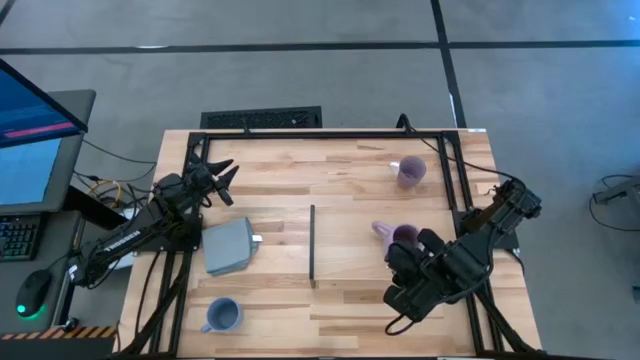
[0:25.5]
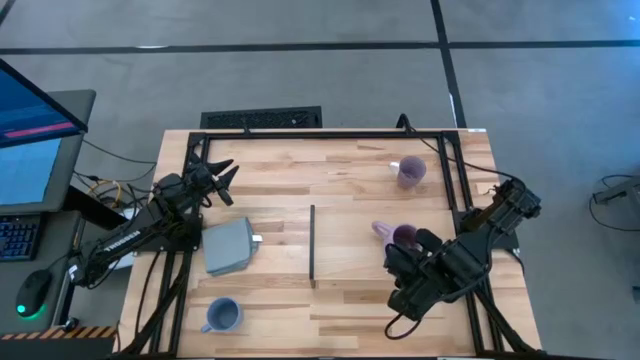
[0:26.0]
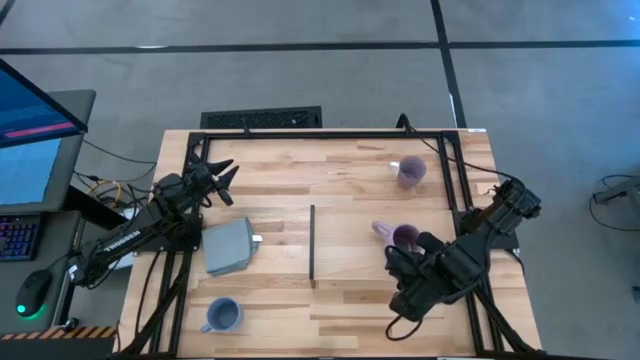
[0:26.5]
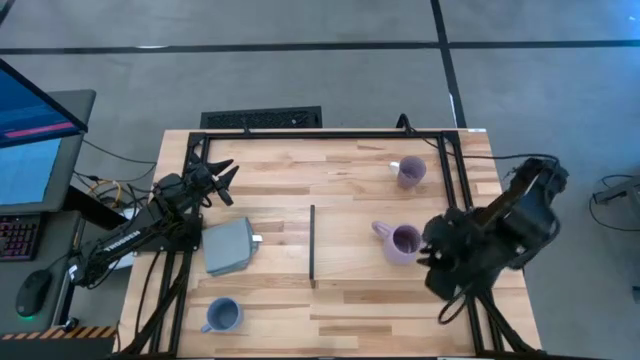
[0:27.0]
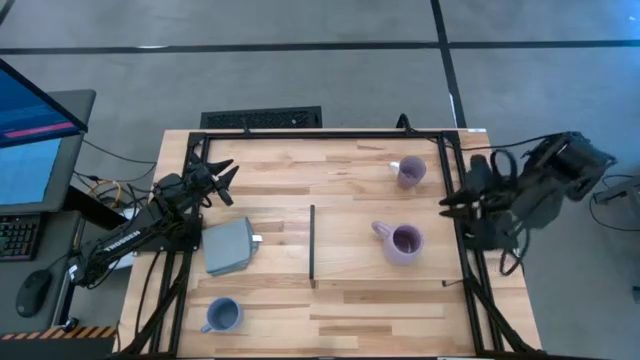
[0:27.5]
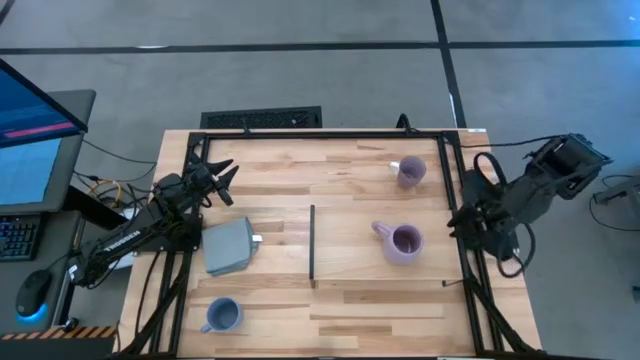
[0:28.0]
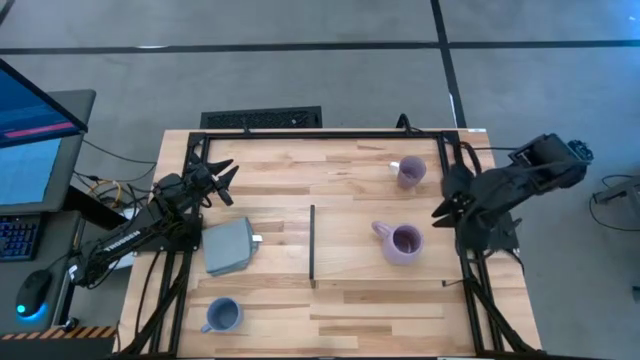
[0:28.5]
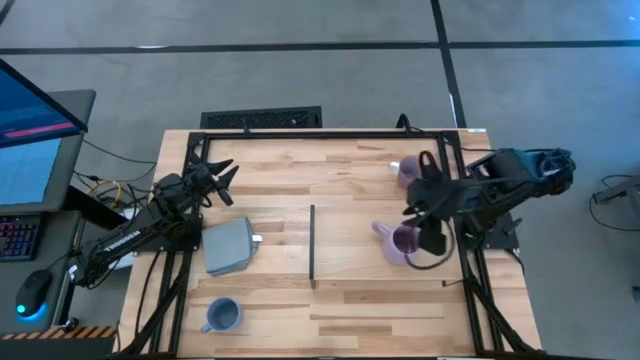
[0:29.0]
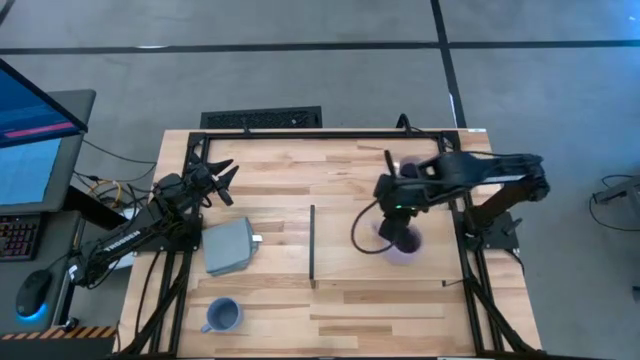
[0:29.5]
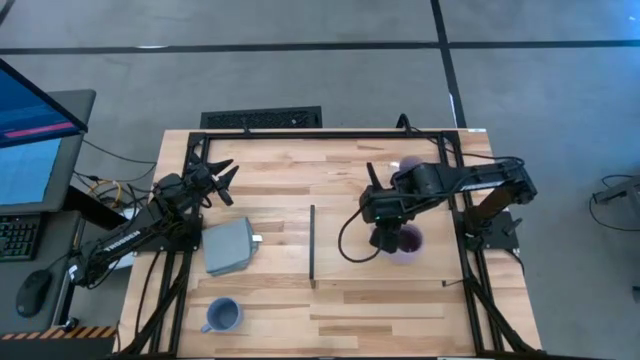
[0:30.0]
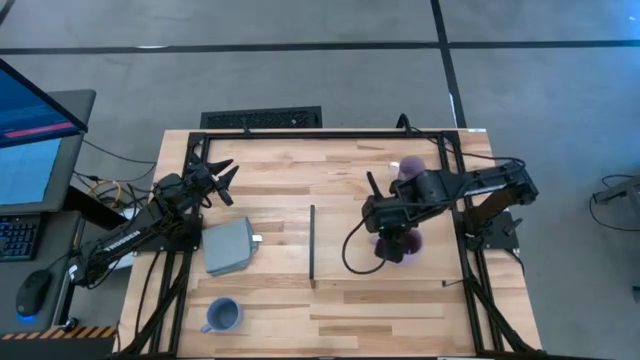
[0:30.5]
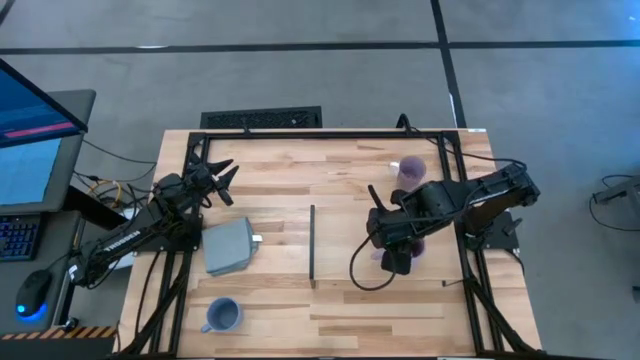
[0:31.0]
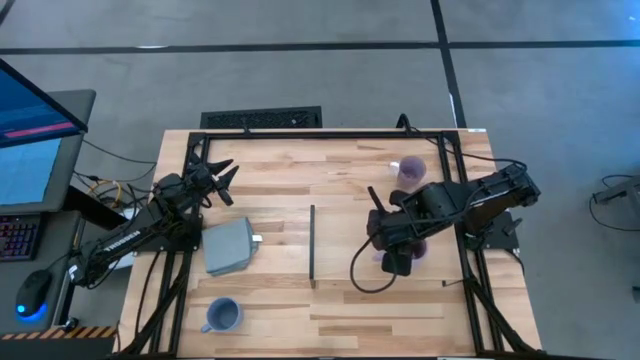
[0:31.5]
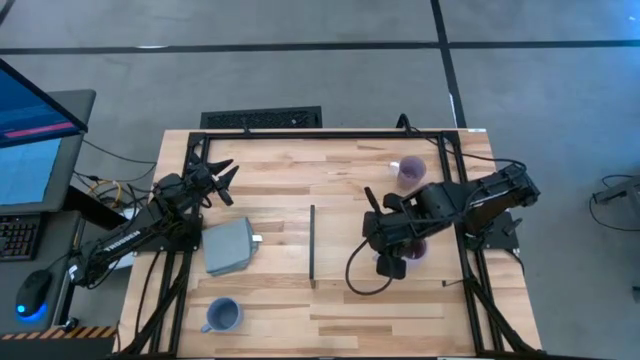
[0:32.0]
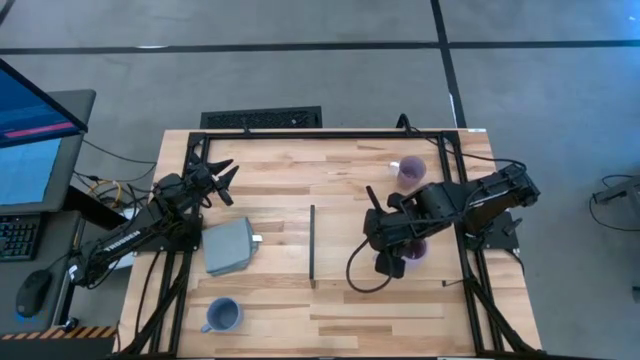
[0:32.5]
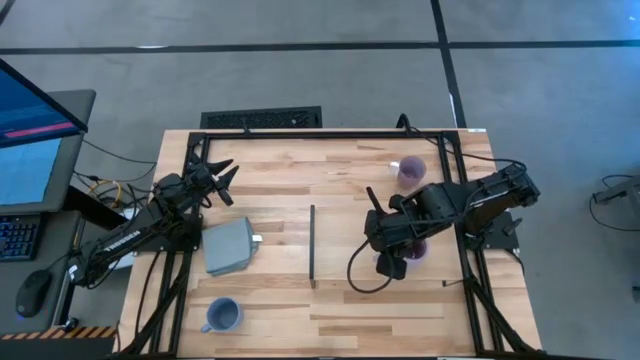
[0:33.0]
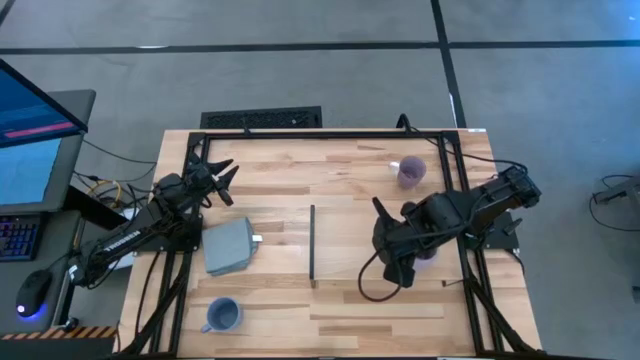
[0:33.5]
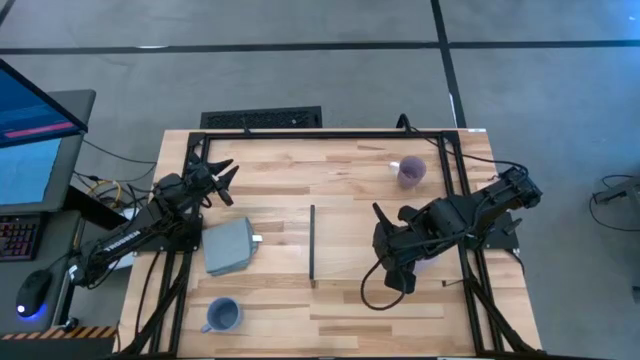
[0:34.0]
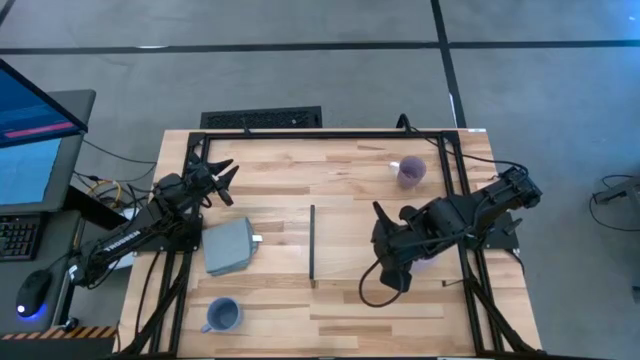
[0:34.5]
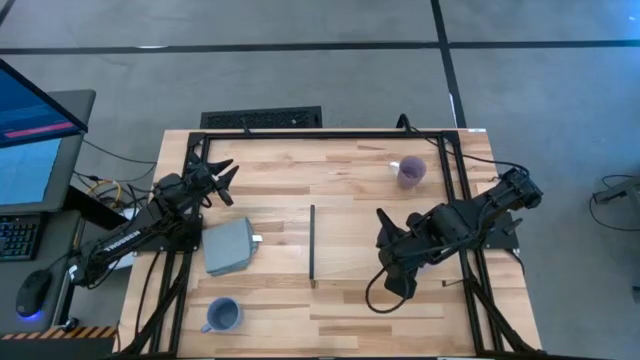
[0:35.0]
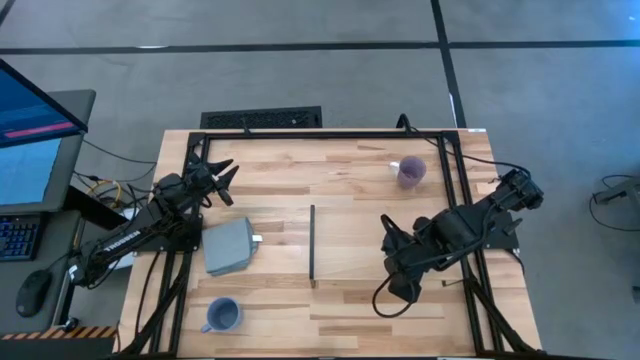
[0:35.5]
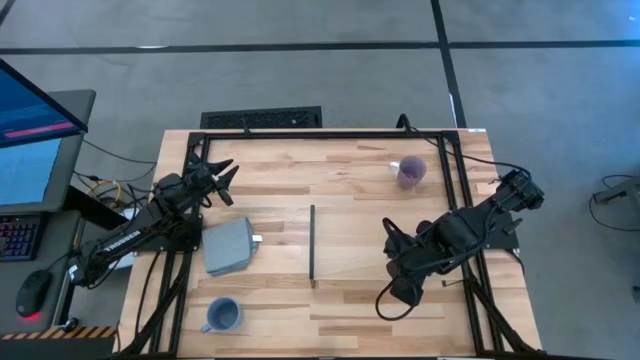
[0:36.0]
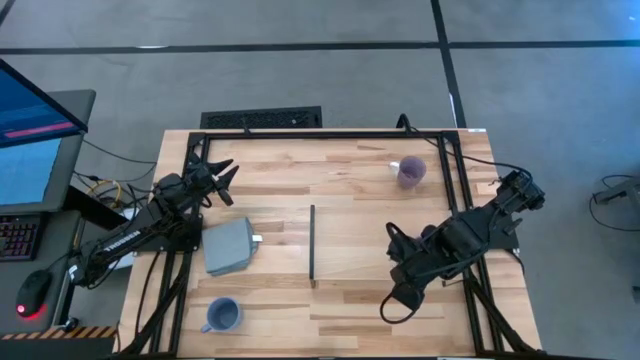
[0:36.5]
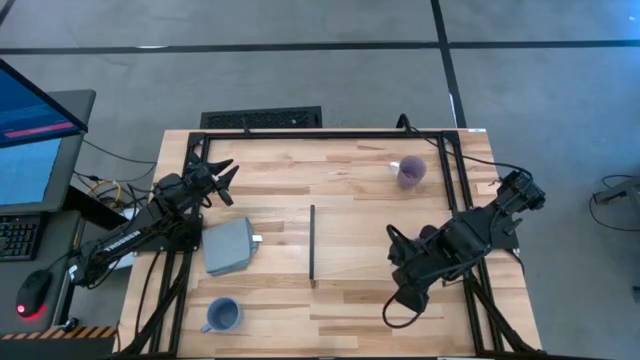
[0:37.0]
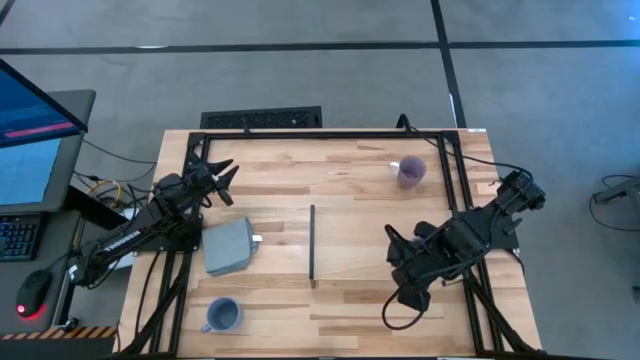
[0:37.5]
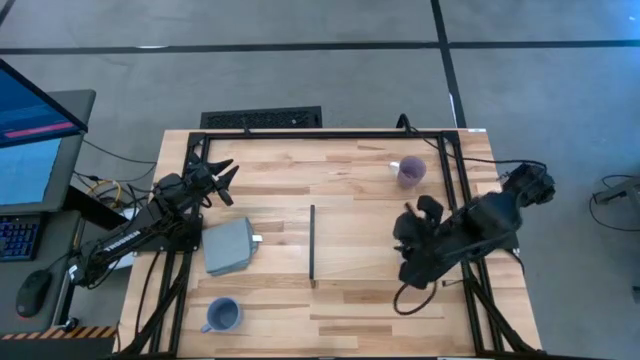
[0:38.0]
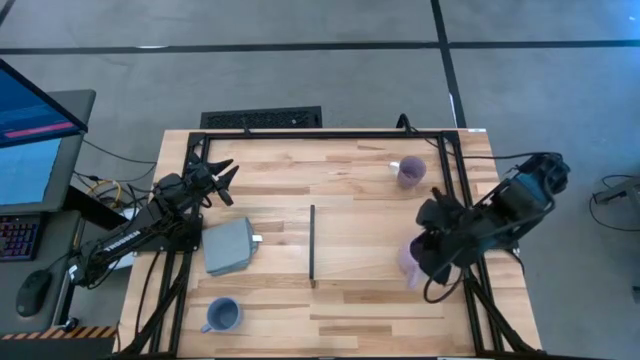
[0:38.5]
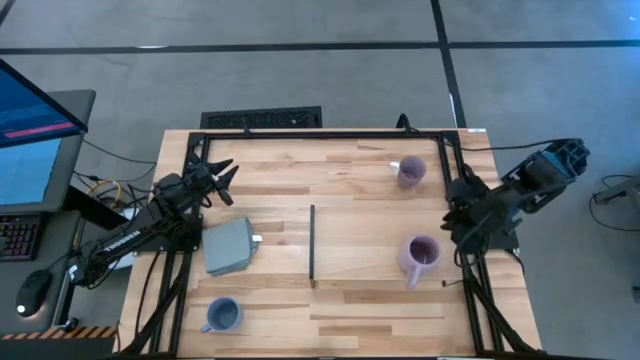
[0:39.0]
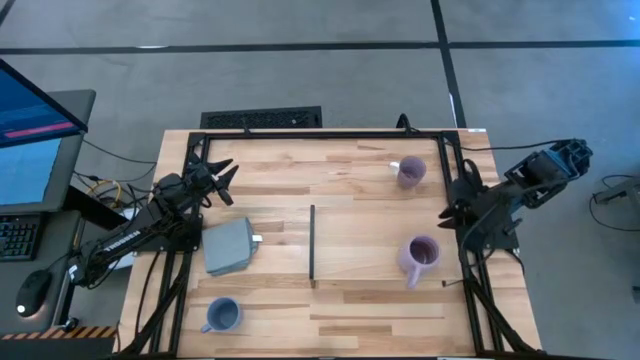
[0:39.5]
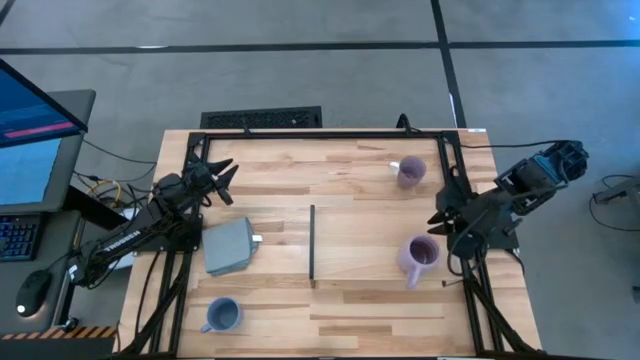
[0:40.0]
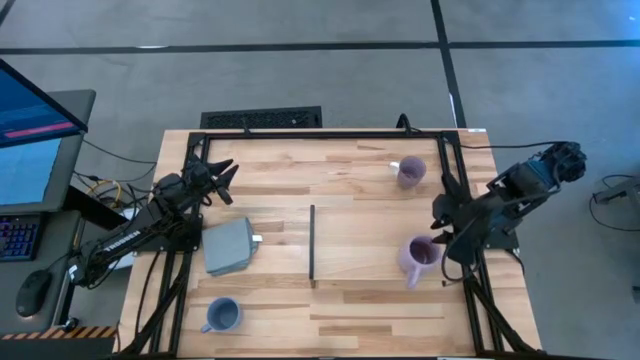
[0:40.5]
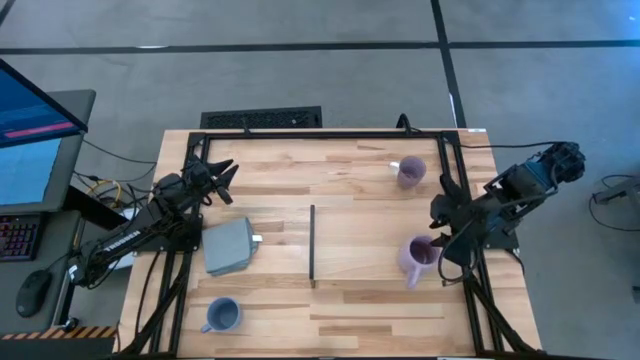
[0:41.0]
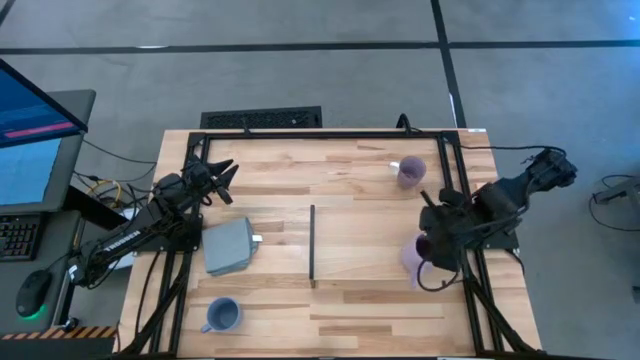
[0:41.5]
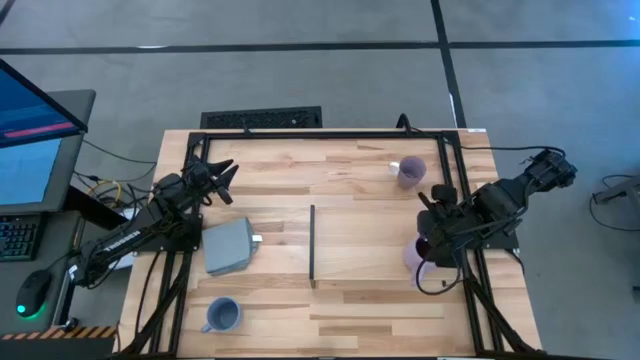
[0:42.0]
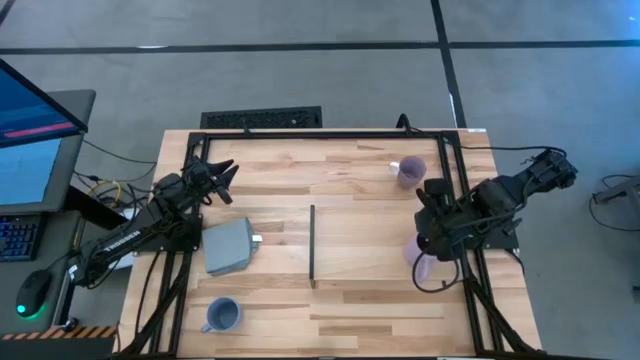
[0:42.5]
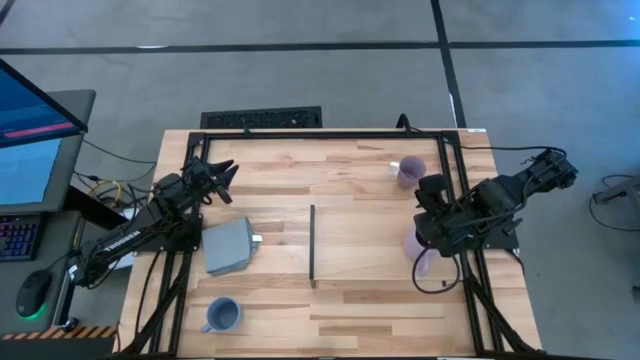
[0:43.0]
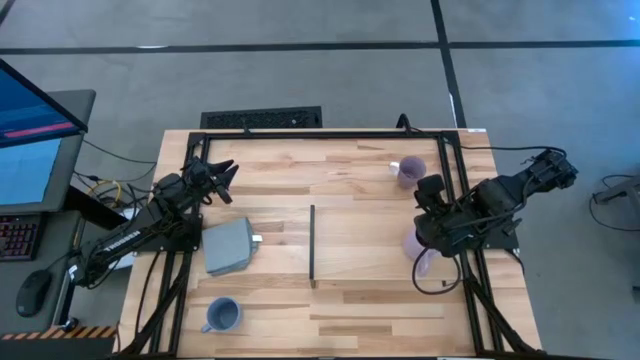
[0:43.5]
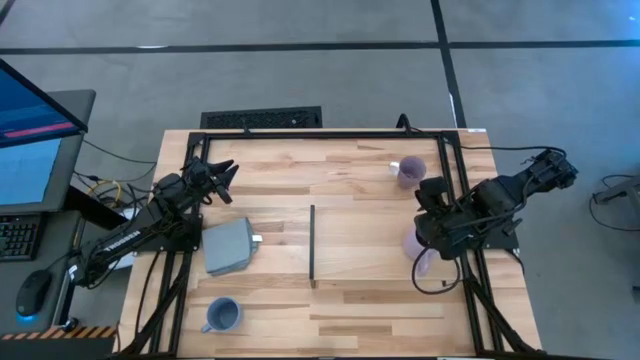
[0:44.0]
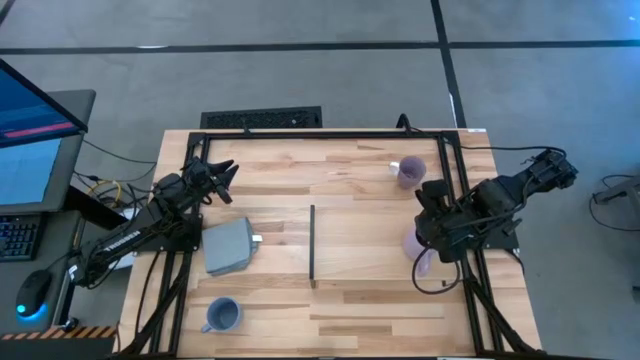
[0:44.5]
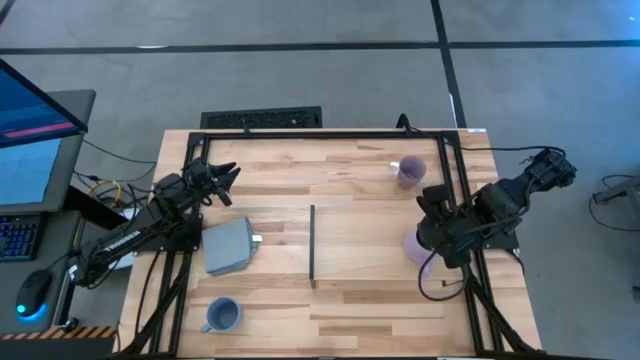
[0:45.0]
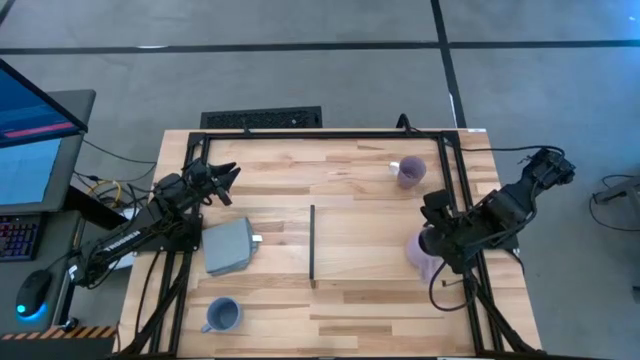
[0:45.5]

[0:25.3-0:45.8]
Task: Stack small to large cups/mugs on shelf
Put the purple mug on the shelf
